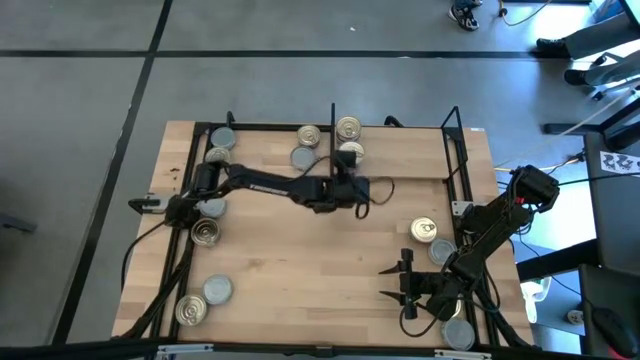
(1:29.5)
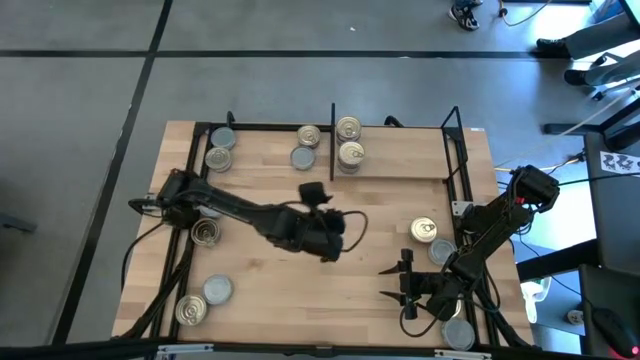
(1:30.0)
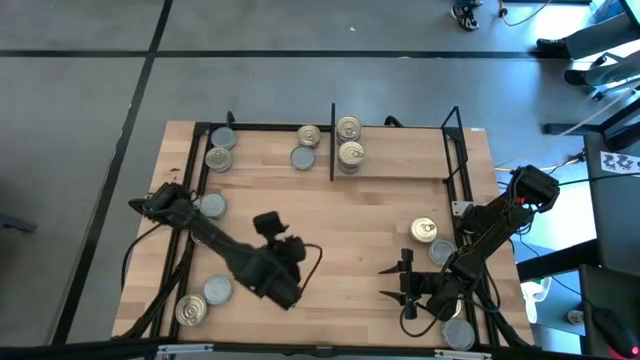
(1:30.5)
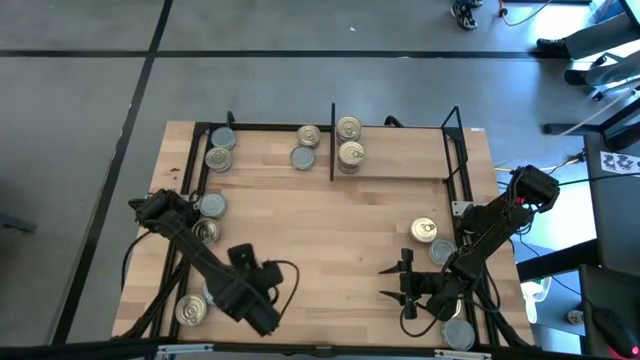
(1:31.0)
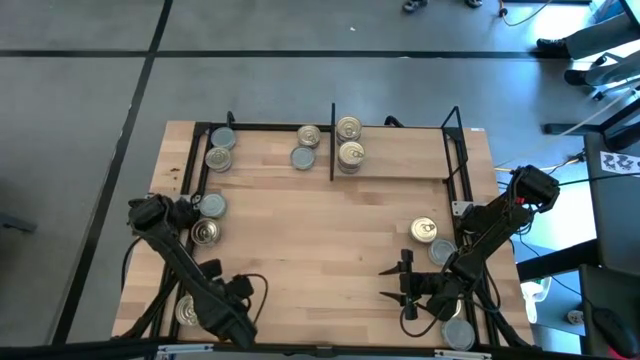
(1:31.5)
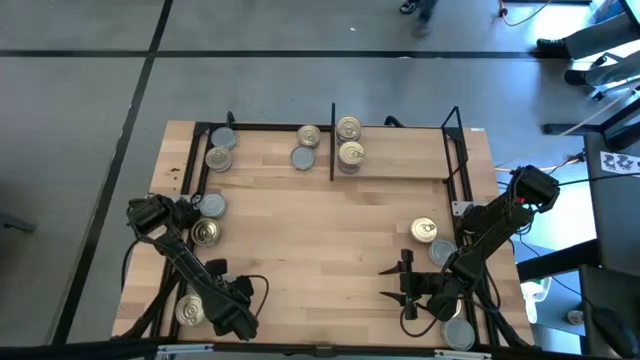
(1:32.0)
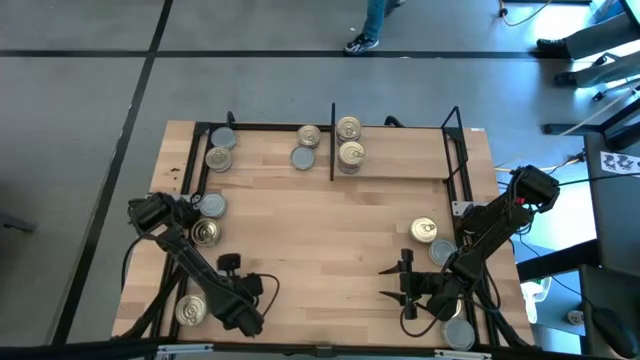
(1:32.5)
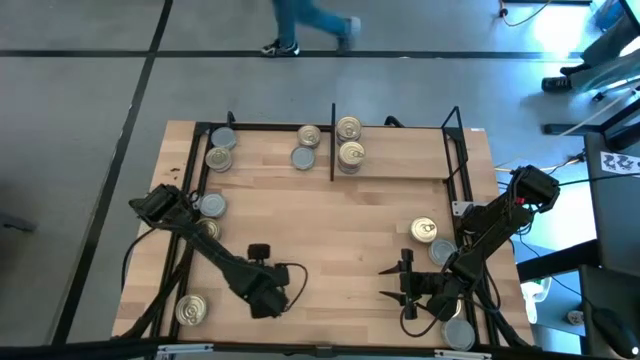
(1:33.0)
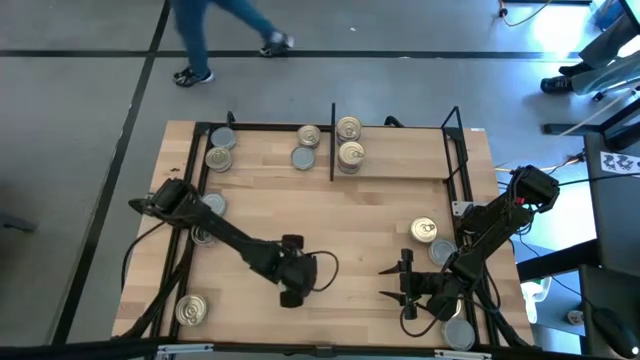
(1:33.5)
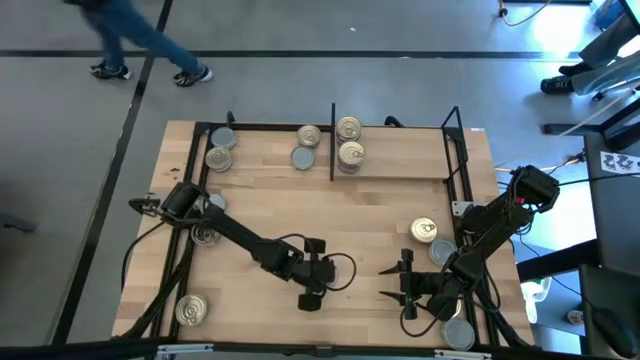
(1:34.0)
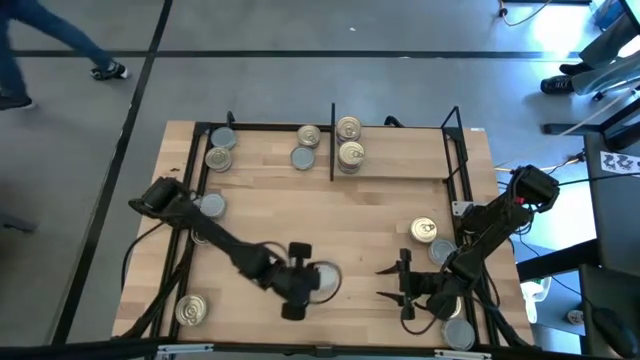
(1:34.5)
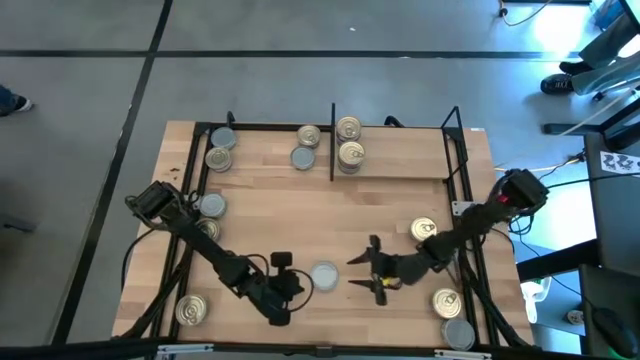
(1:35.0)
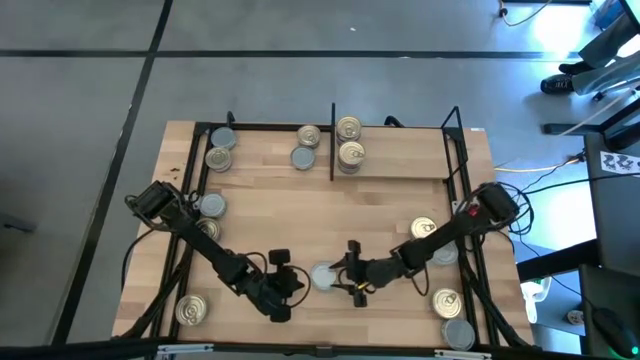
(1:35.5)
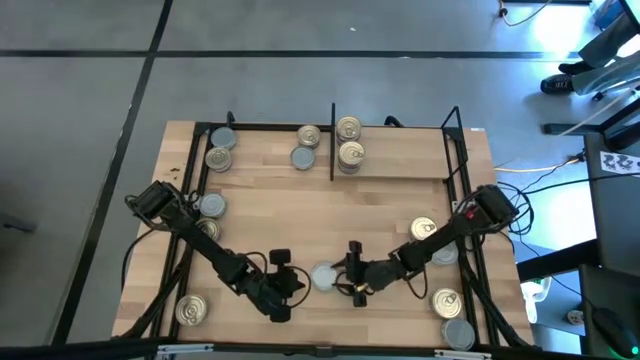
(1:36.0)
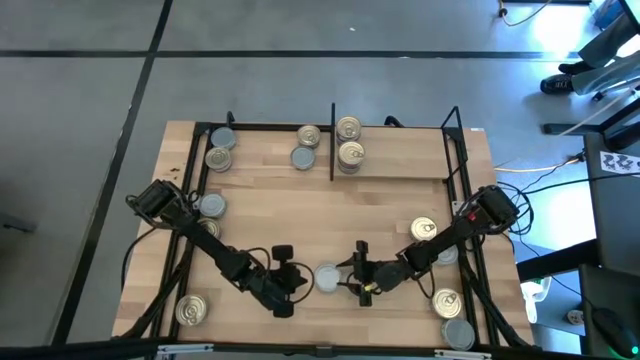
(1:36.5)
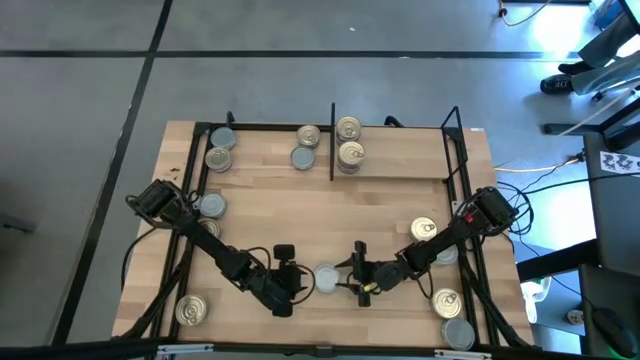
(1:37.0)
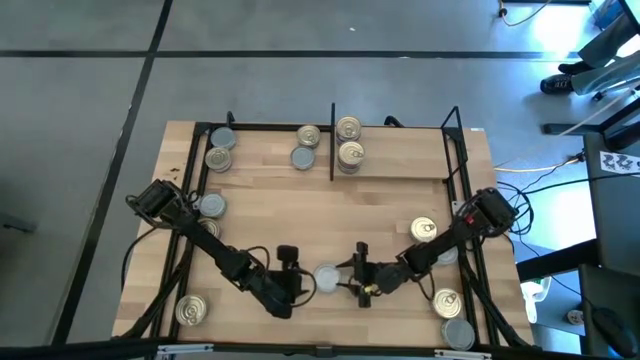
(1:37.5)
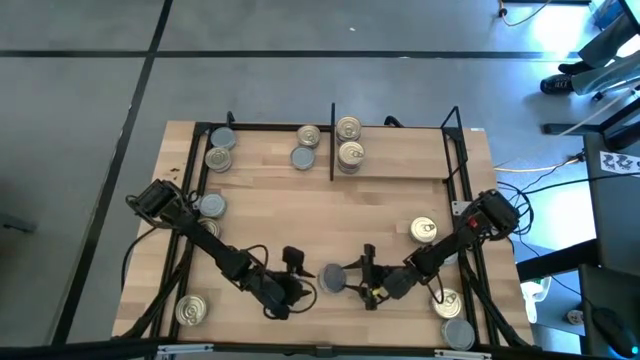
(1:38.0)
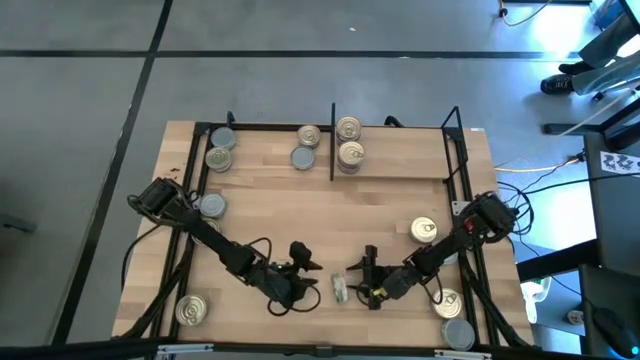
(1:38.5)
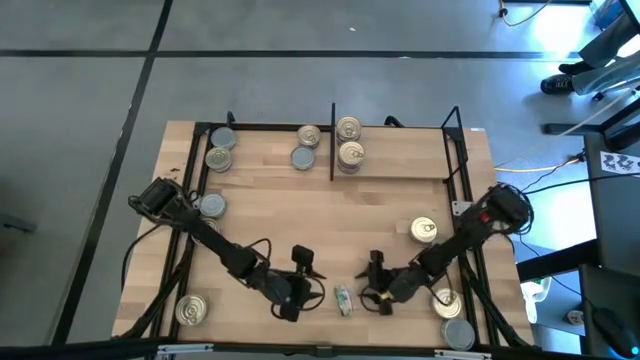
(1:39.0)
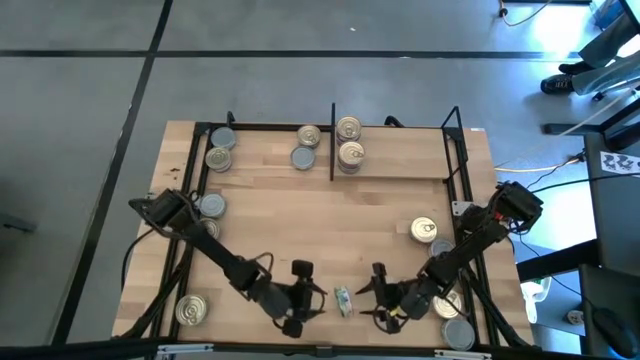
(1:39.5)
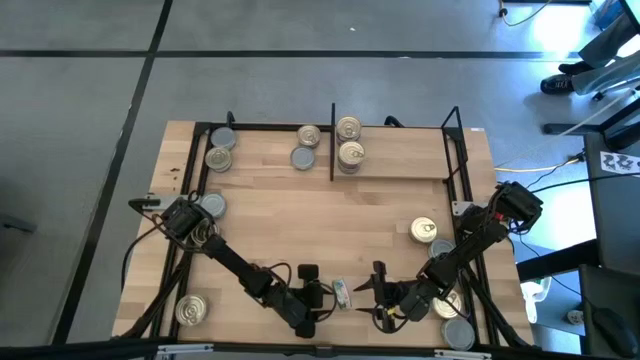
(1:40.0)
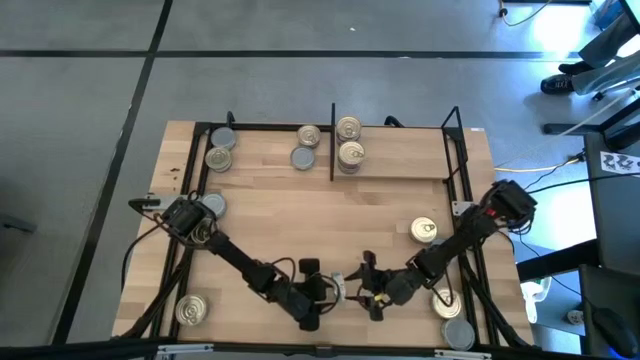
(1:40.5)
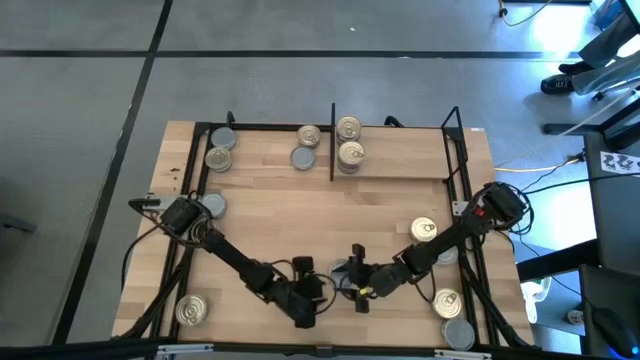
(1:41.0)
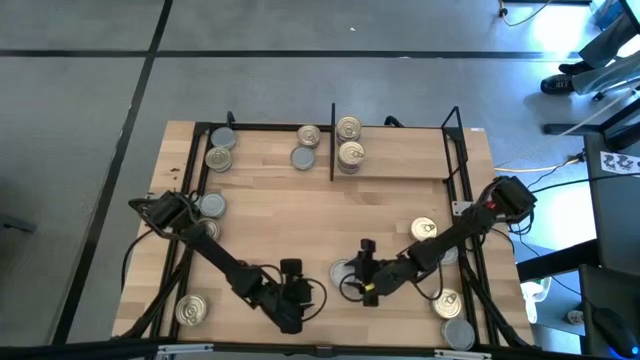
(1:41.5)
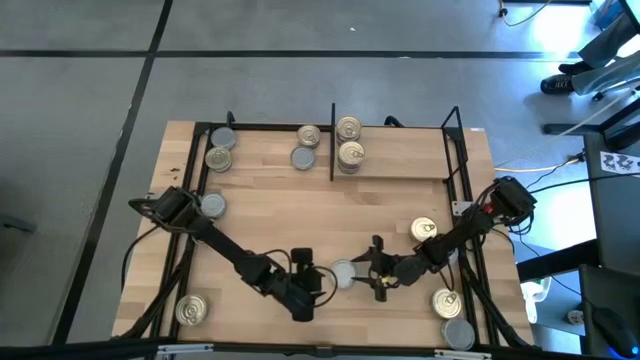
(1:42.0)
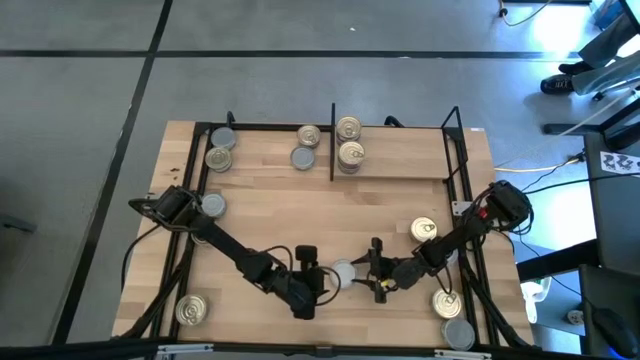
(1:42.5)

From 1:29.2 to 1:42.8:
Task: Stack canned seafood by type on shelf
Put the left green tuna can on the shelf

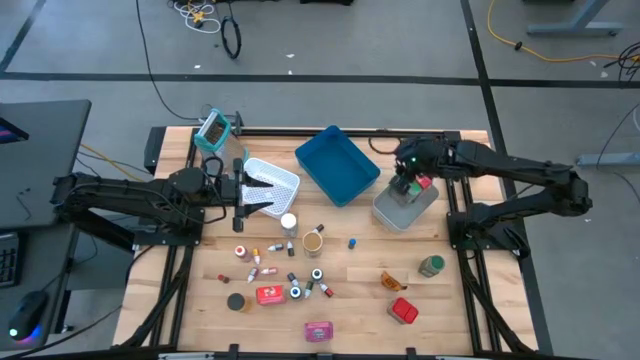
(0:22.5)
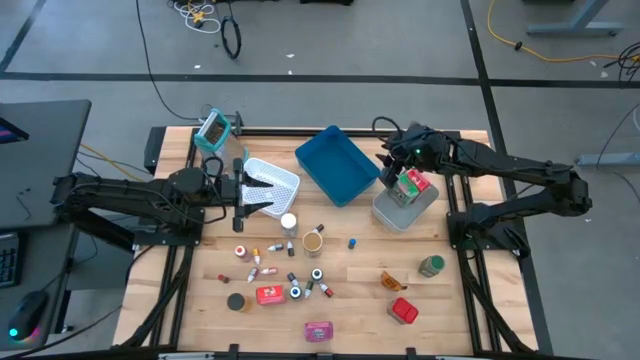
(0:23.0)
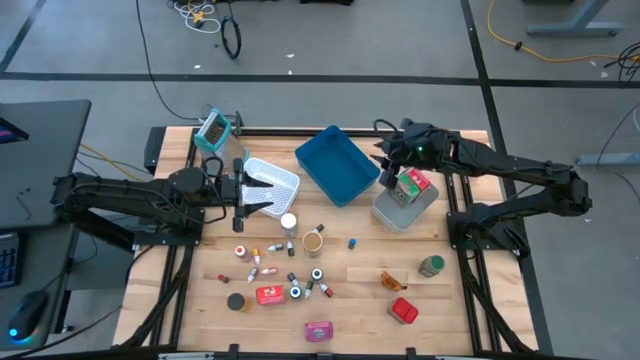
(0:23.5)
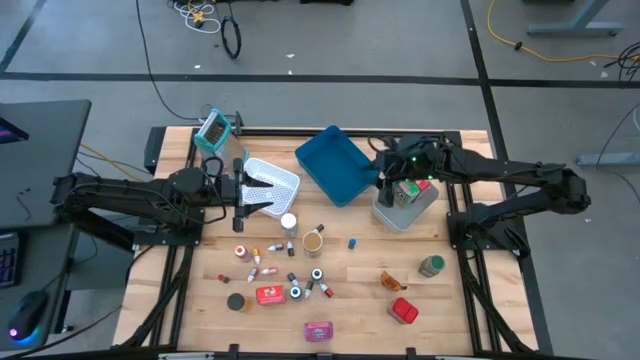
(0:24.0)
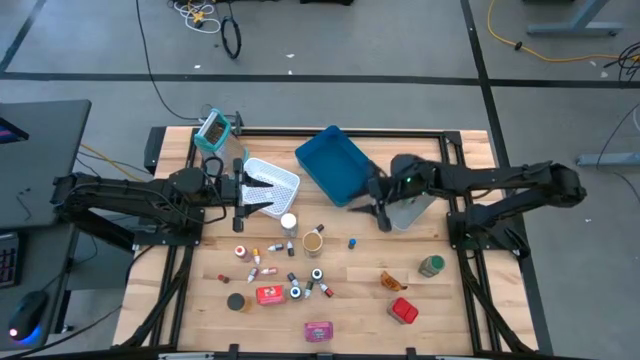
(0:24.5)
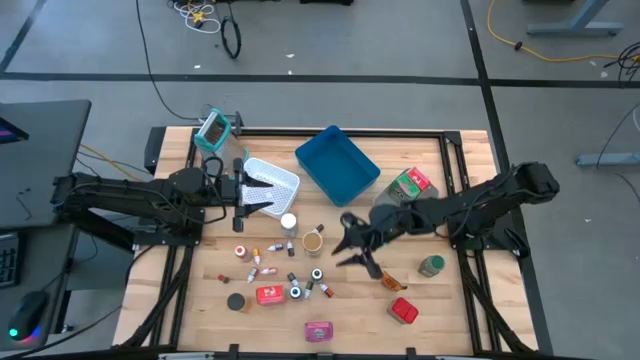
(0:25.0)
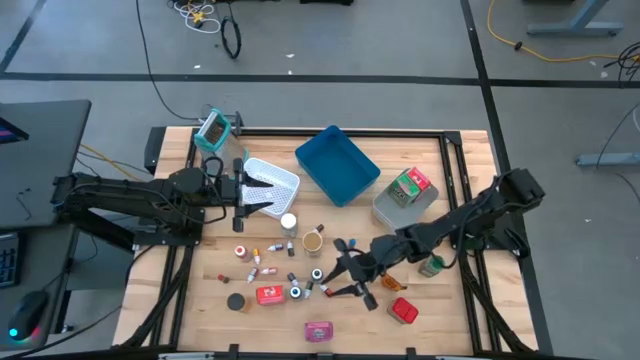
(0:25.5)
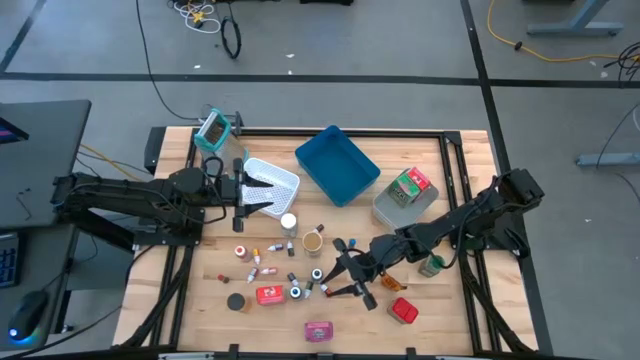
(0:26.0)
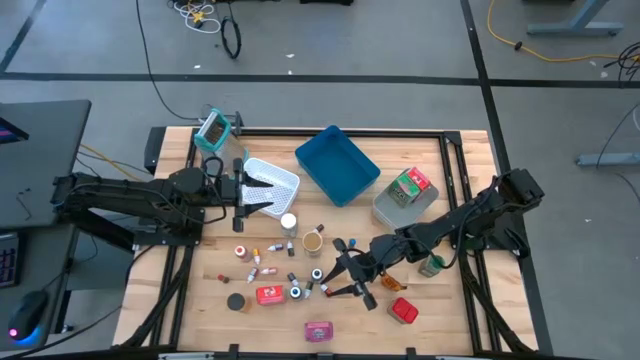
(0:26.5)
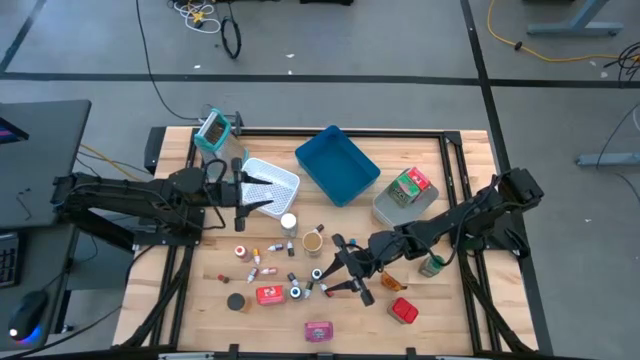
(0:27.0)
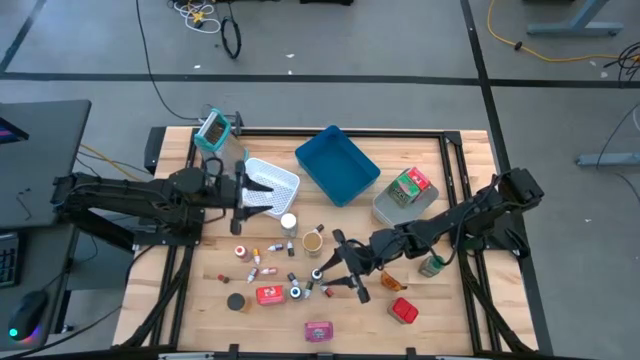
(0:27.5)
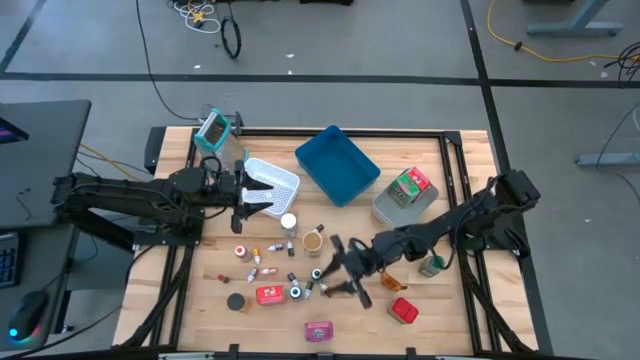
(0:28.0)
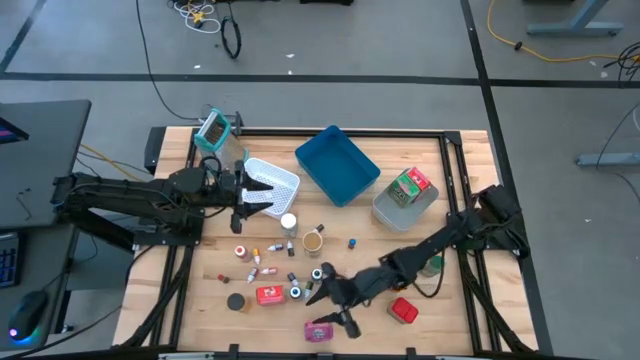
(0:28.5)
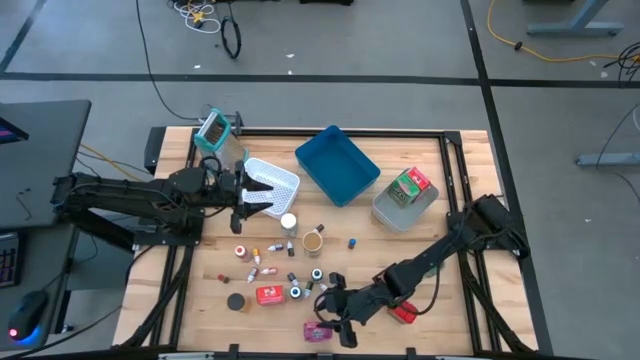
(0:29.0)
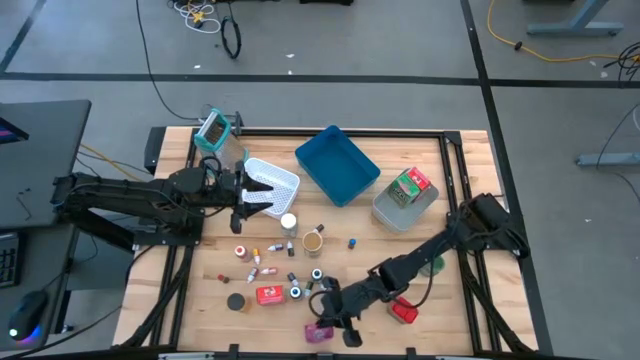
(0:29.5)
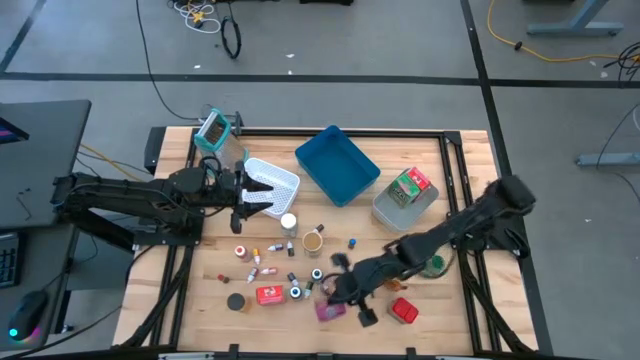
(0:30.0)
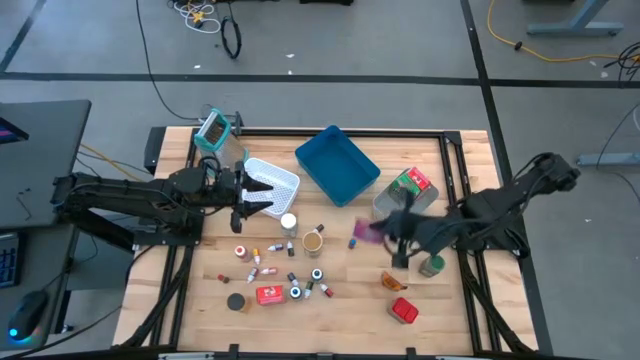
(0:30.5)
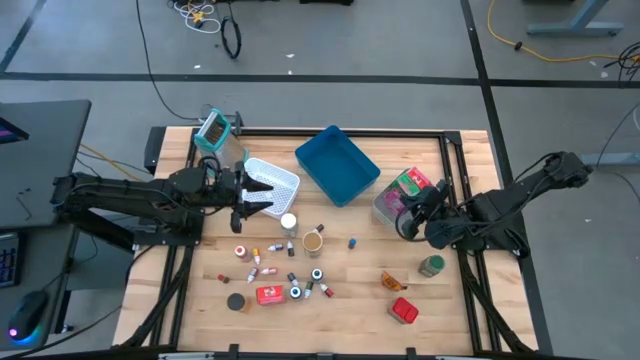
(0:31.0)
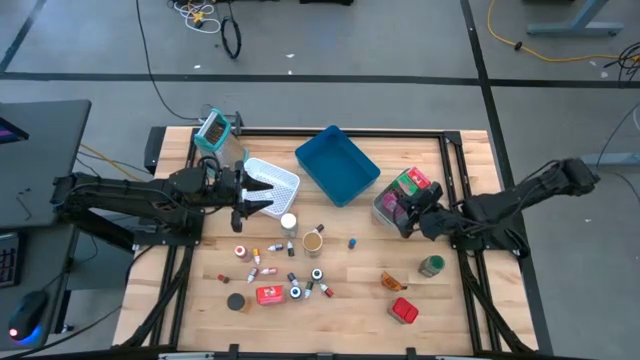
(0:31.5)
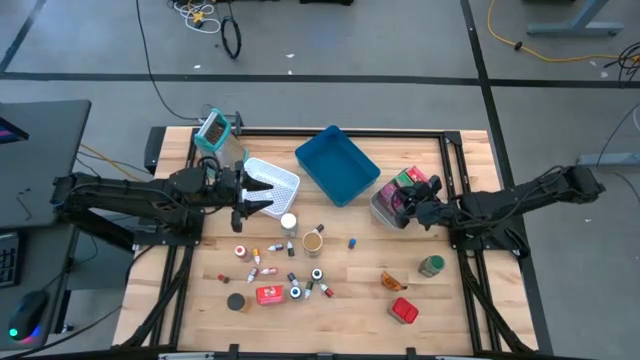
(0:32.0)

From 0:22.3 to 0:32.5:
Task: Pick & Place Kitchen Items
Put the purple cereal box into the gray bin
